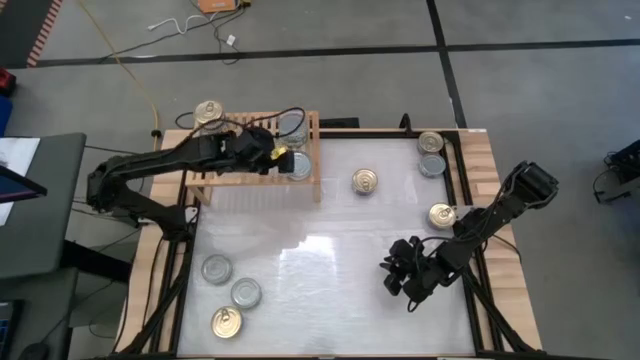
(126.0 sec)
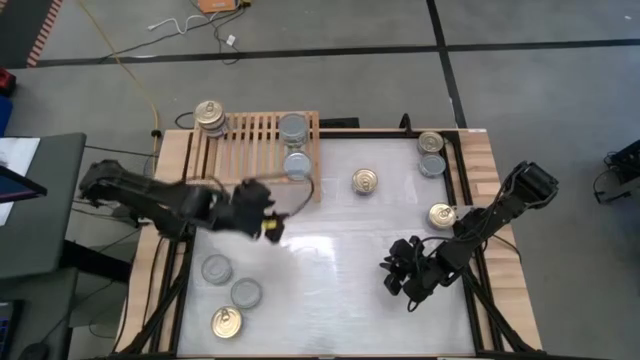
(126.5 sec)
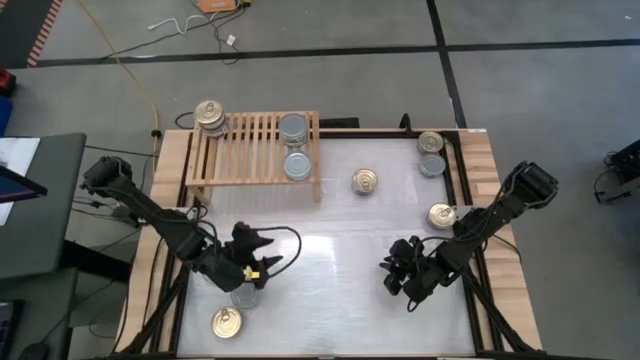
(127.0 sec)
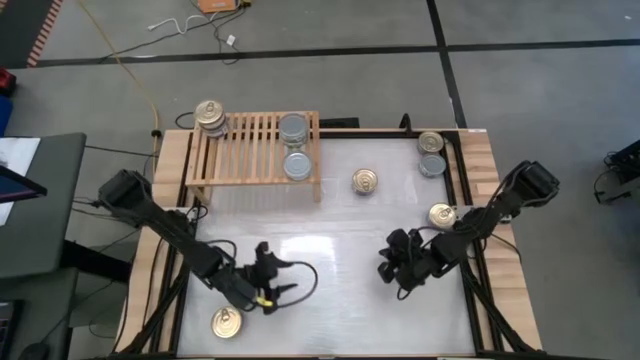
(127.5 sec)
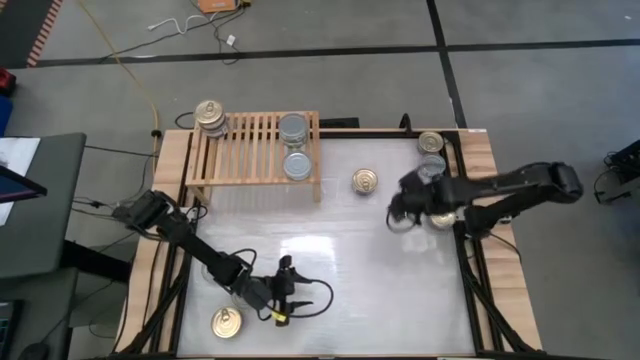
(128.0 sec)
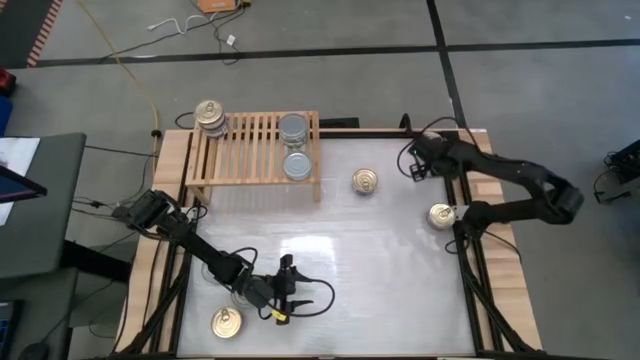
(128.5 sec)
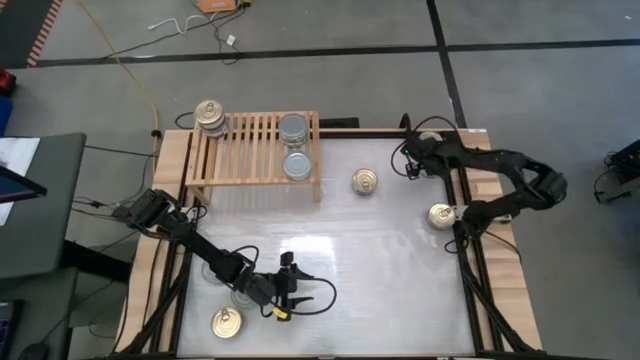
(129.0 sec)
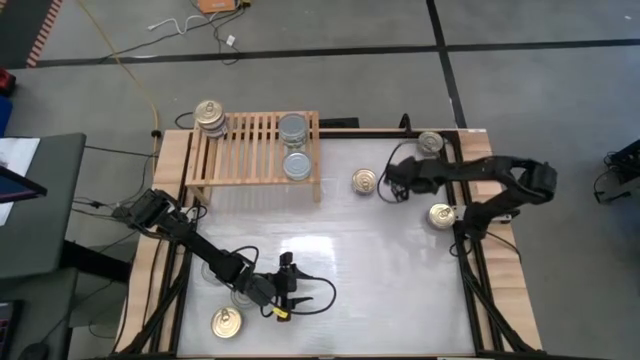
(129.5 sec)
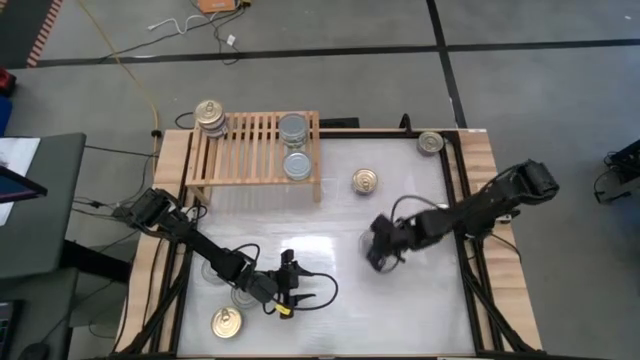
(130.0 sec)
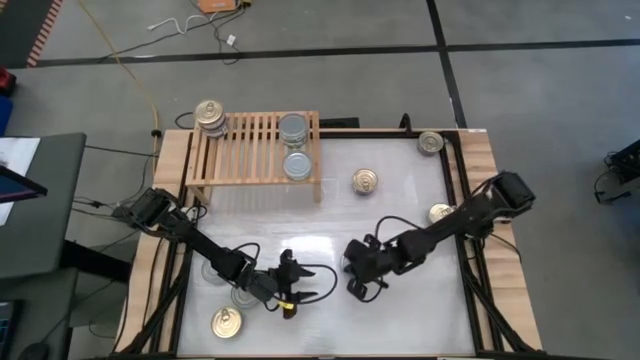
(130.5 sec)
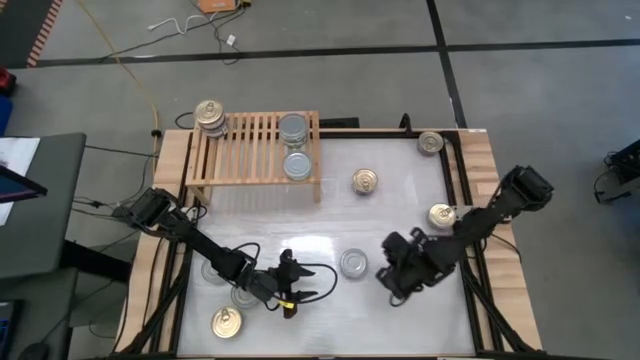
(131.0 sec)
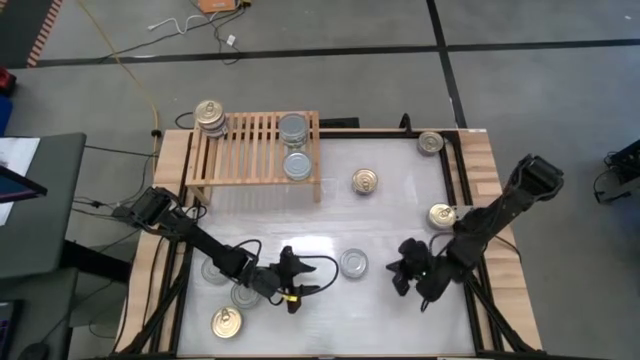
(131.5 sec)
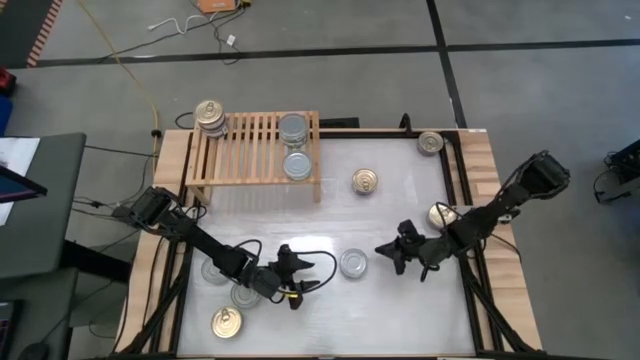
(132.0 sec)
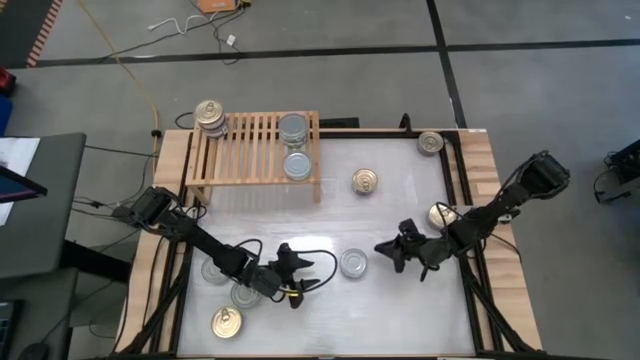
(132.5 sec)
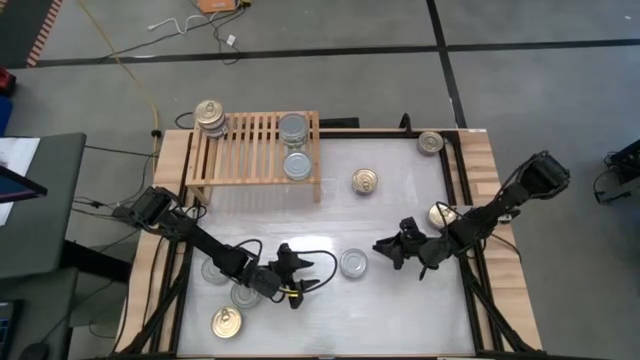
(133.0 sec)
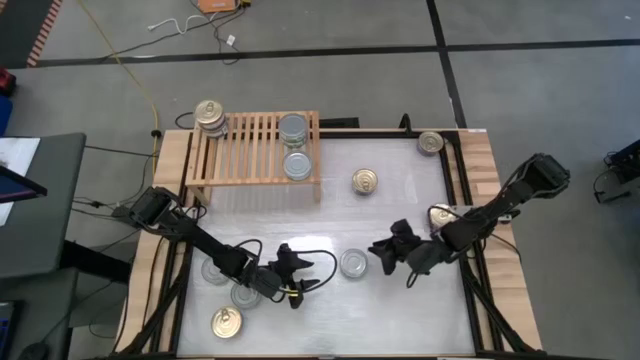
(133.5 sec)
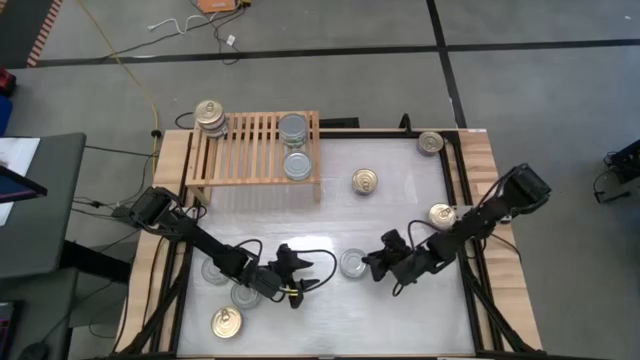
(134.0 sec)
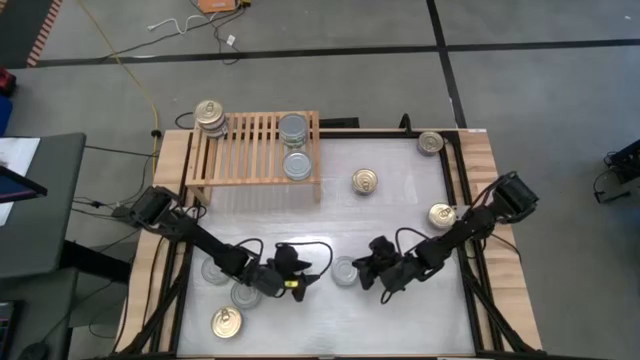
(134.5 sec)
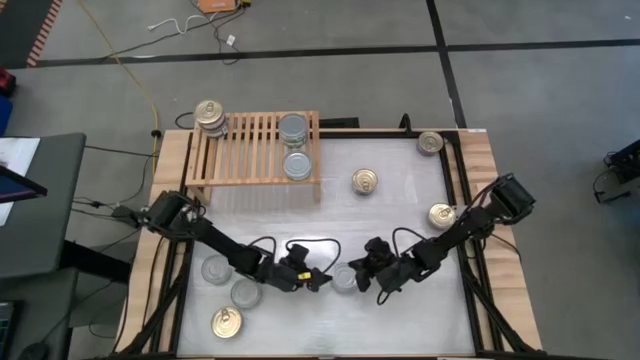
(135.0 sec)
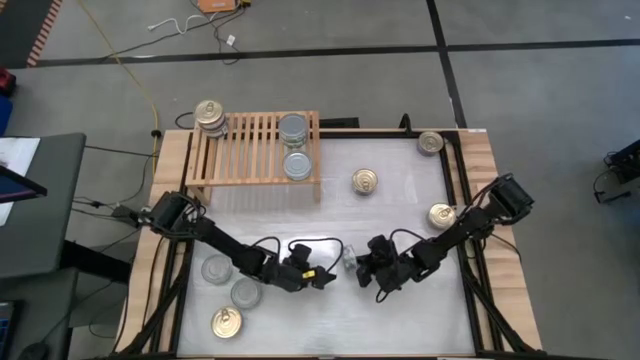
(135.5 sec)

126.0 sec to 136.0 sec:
Task: Stack canned seafood by type on shelf
Stack the green tuna can on top of the bottom green tuna can on the shelf

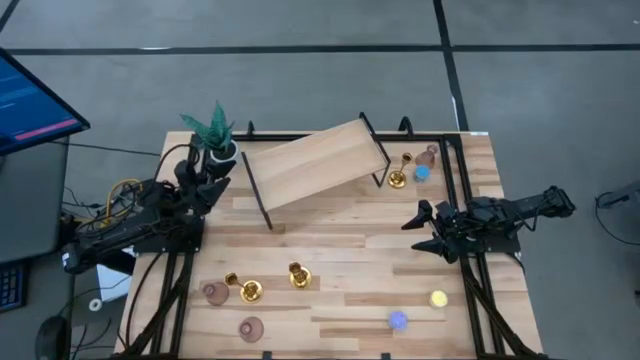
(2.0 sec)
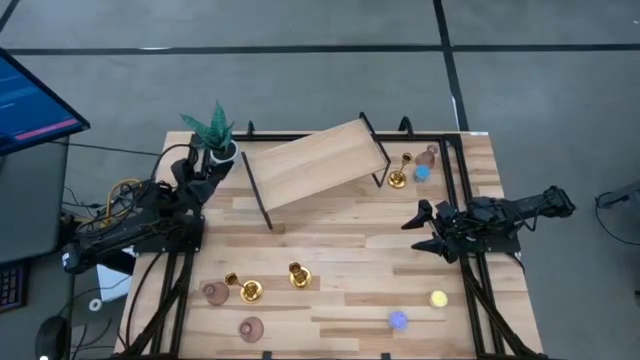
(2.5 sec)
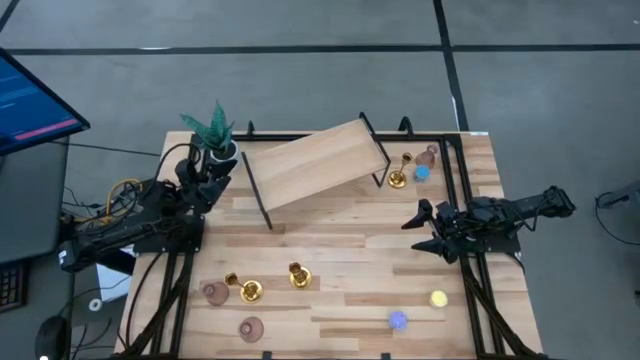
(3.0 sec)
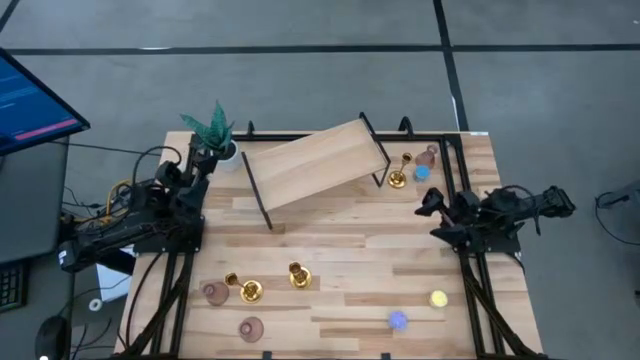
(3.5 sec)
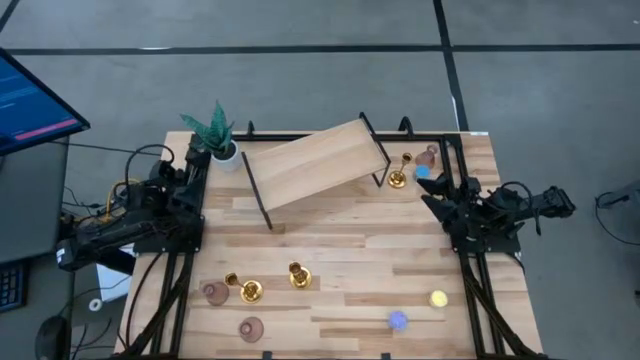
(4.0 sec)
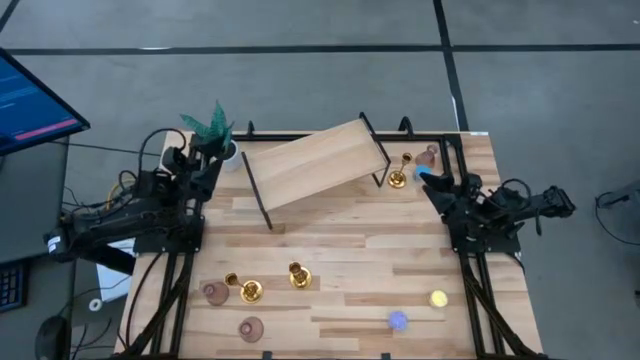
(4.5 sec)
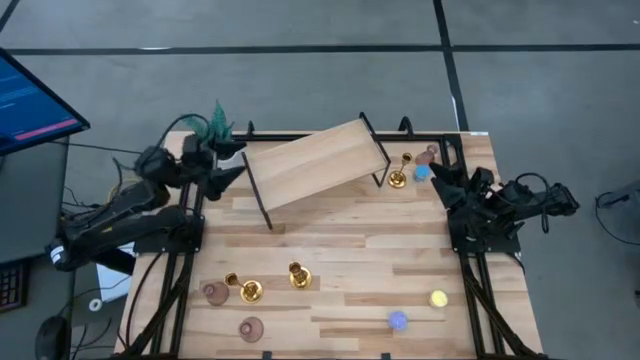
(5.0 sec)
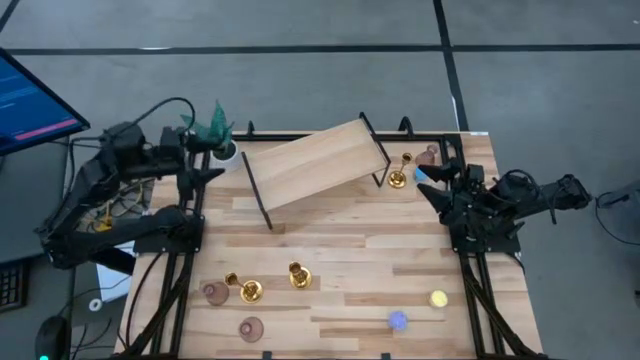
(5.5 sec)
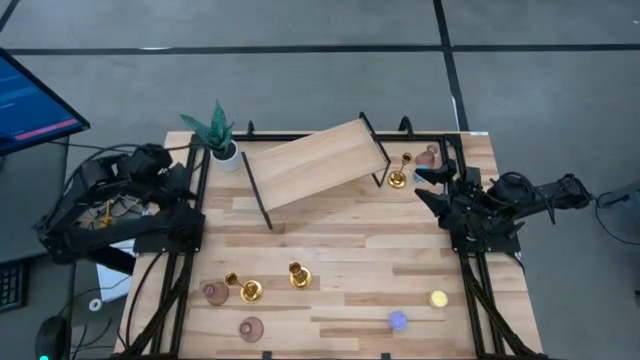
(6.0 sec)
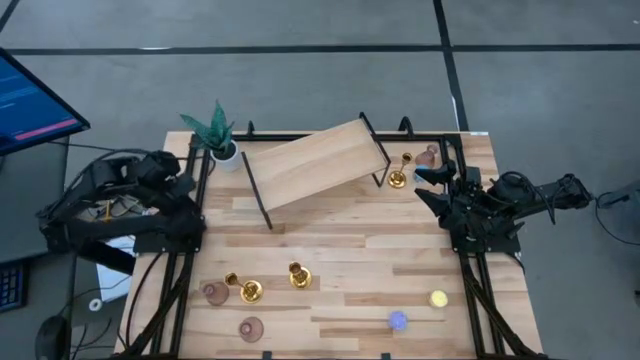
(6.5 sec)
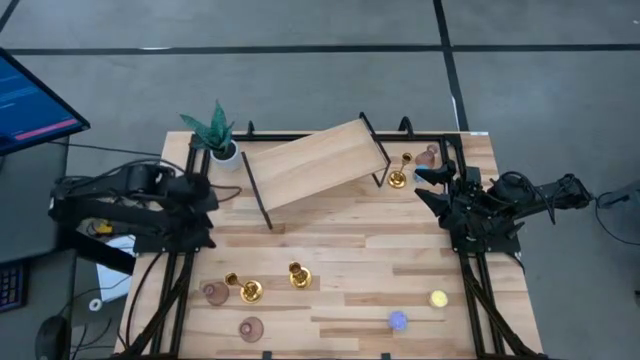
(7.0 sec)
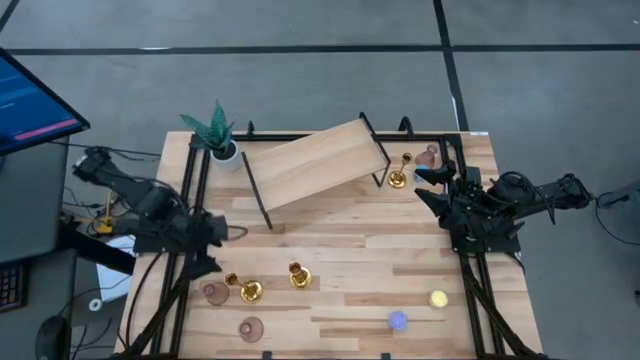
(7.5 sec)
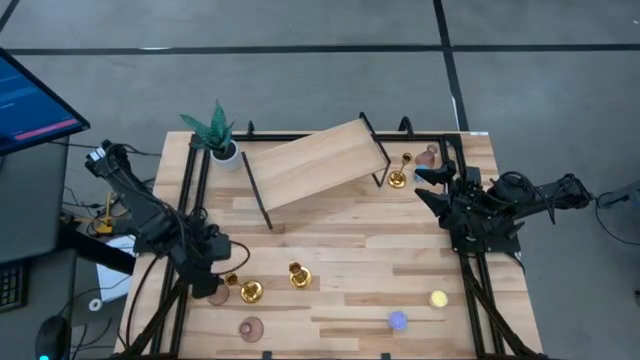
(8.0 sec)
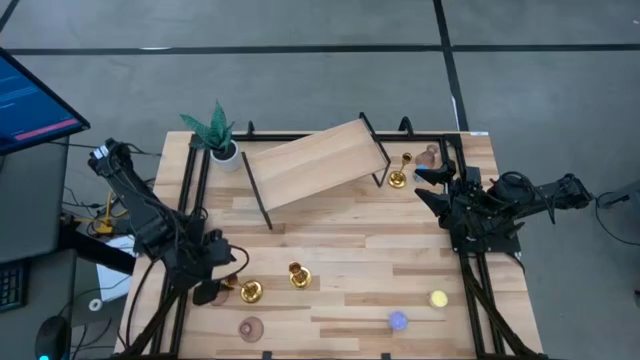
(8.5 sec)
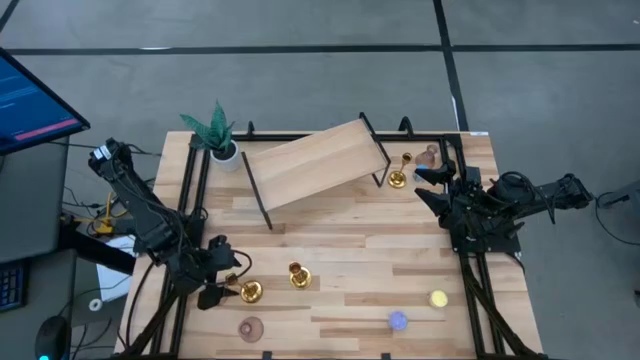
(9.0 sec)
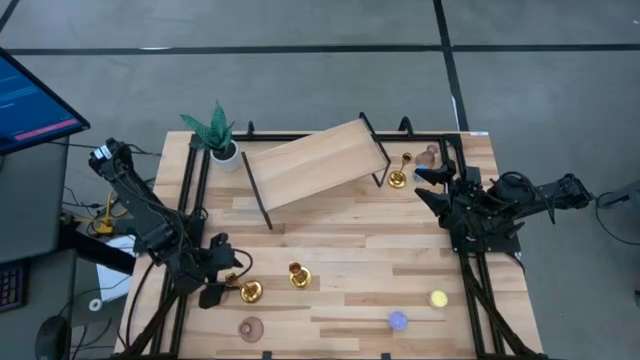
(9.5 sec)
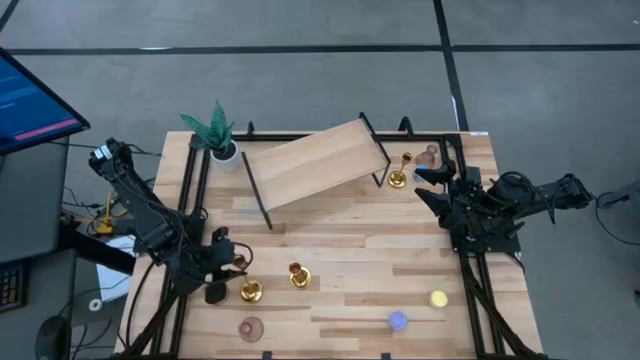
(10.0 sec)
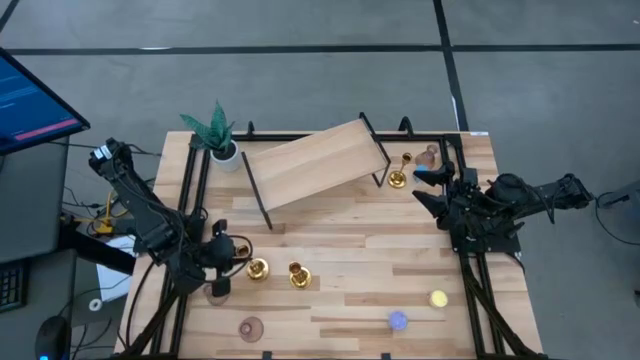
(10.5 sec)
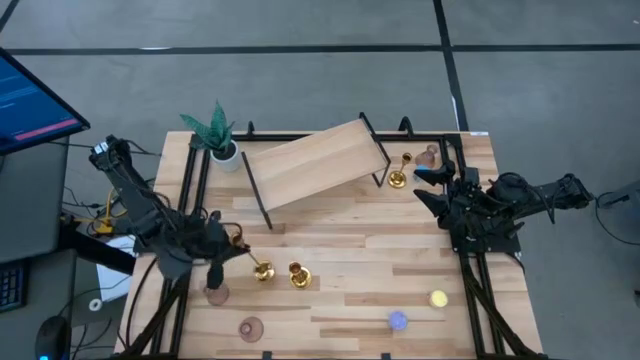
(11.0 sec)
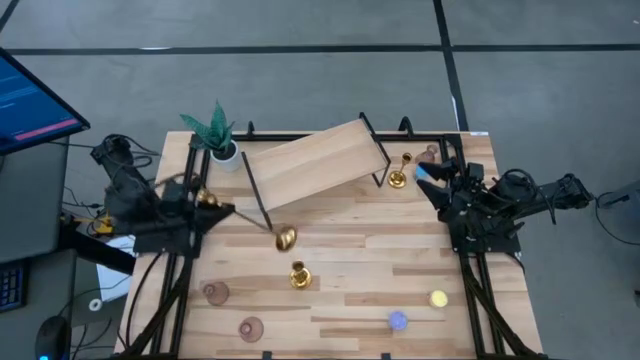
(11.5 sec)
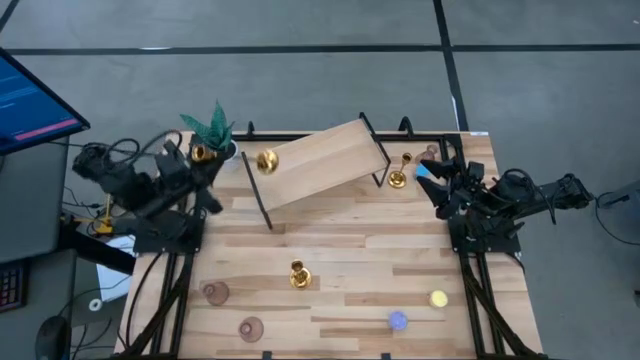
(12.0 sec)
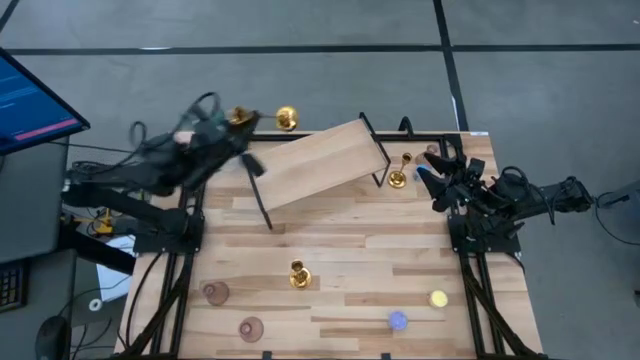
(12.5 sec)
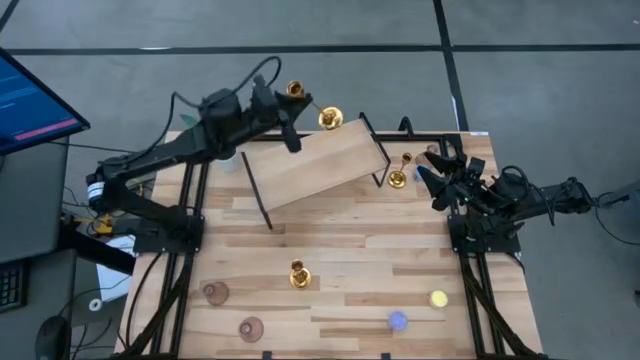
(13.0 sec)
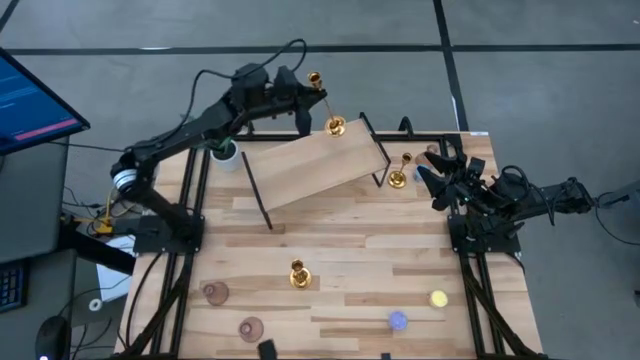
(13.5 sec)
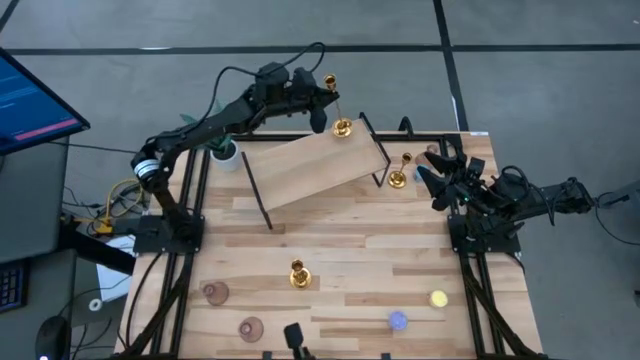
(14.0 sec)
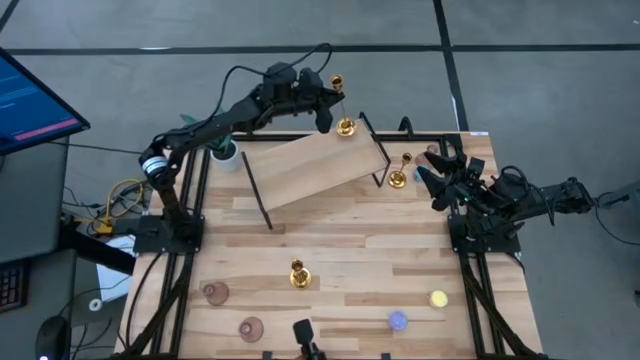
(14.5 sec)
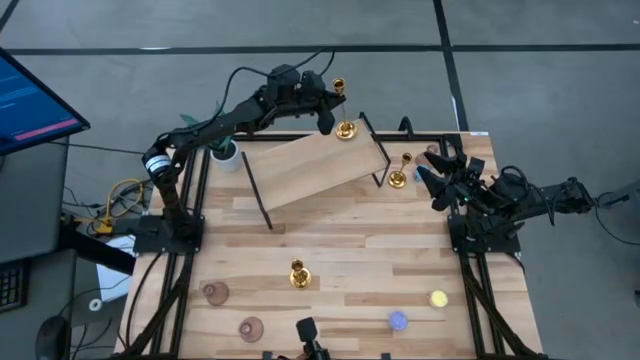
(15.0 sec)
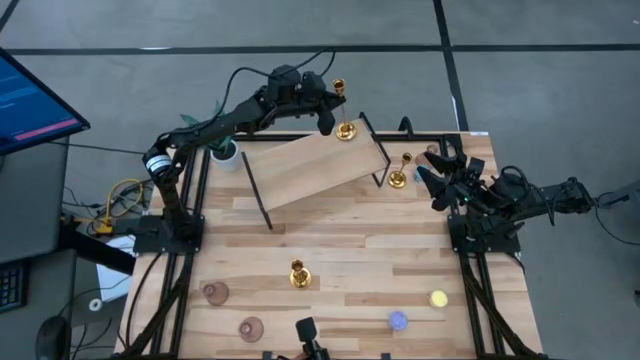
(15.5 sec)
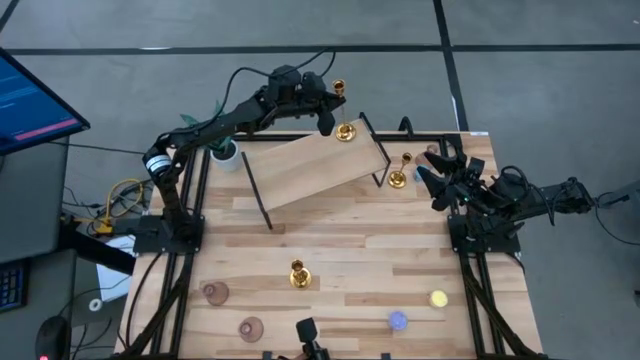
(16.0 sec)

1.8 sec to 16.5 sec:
Task: Pick & Place candle stick holders
Put the bottom left gold candle holder on the shelf
